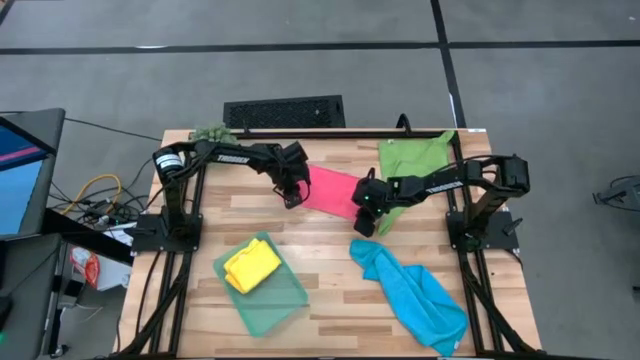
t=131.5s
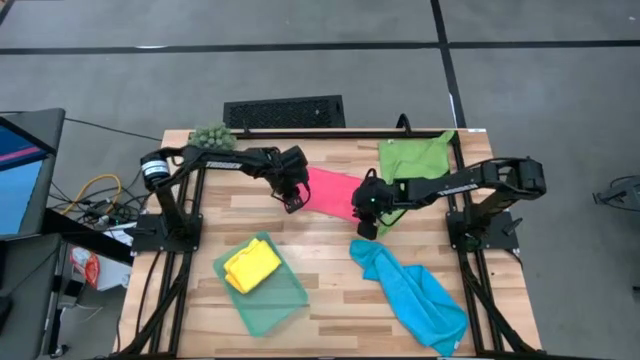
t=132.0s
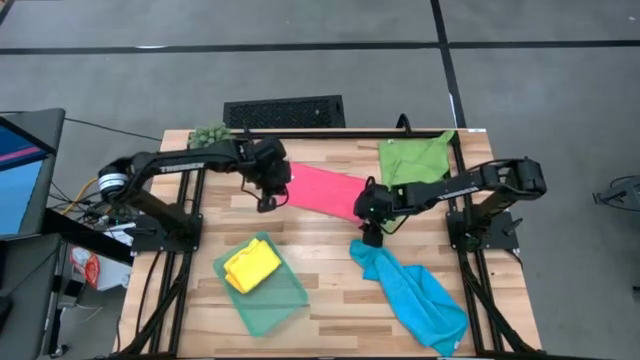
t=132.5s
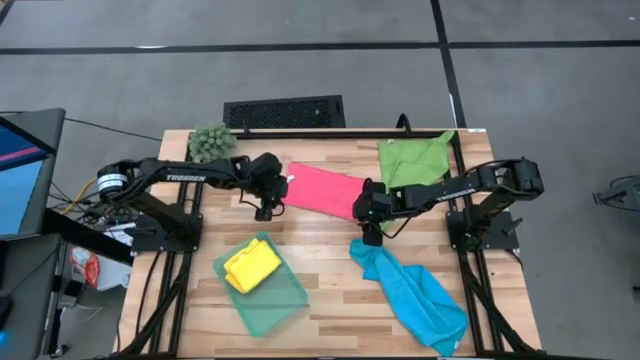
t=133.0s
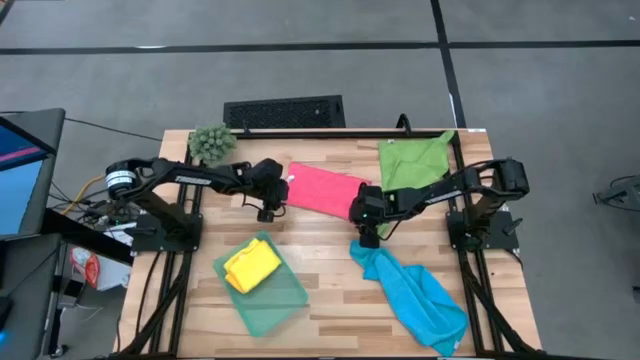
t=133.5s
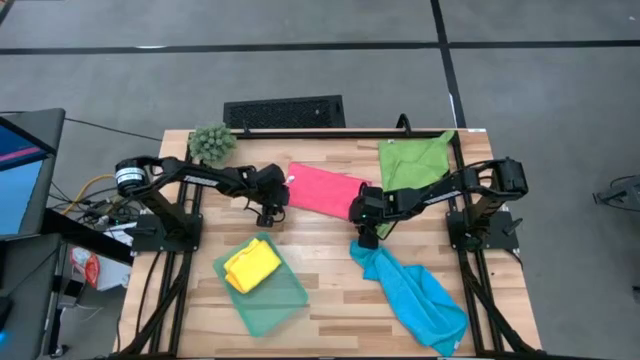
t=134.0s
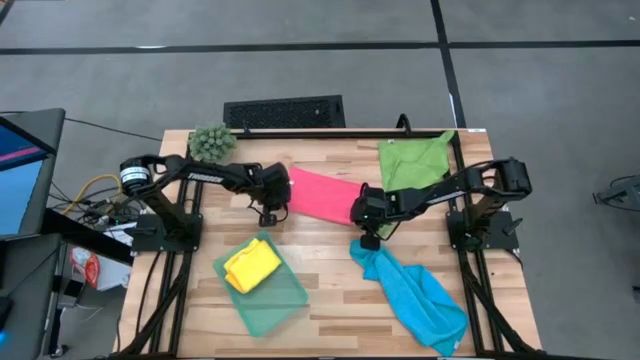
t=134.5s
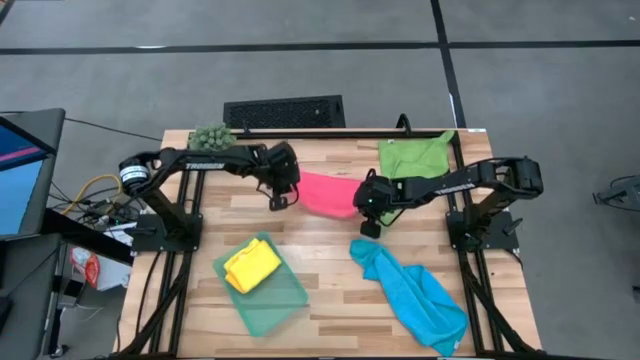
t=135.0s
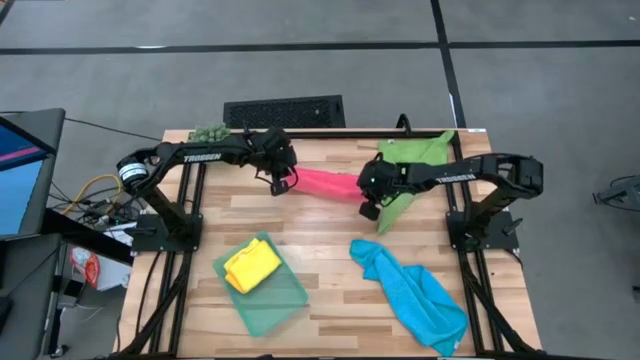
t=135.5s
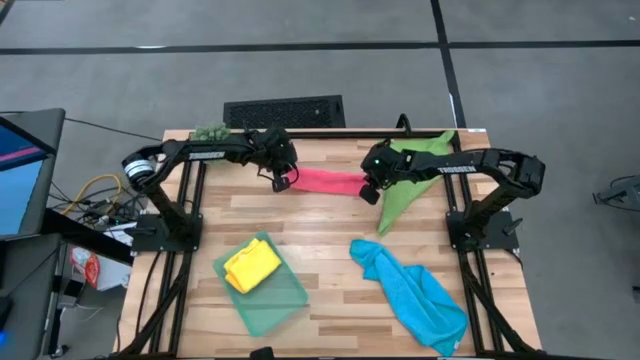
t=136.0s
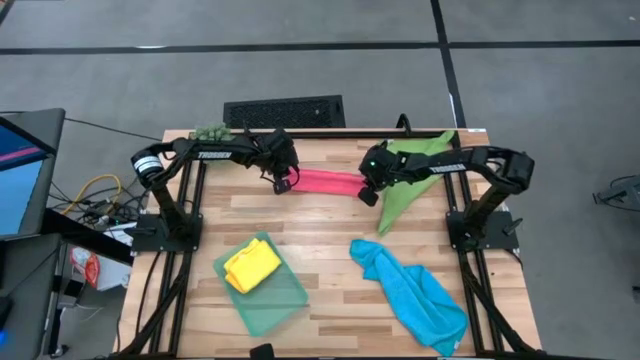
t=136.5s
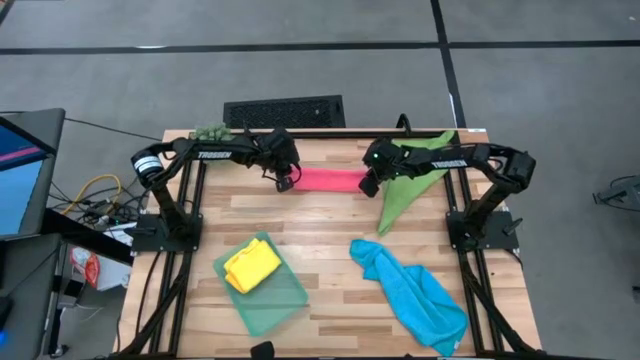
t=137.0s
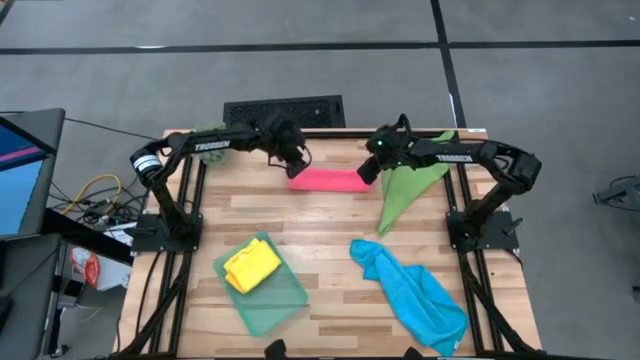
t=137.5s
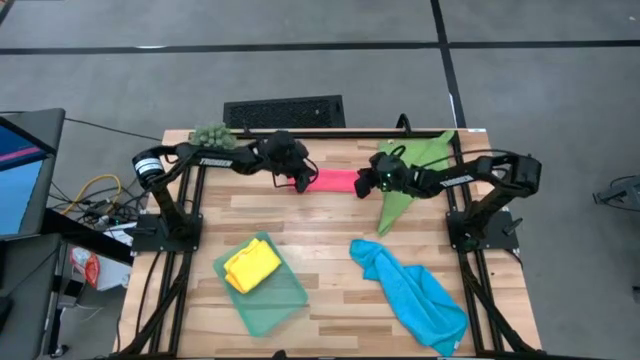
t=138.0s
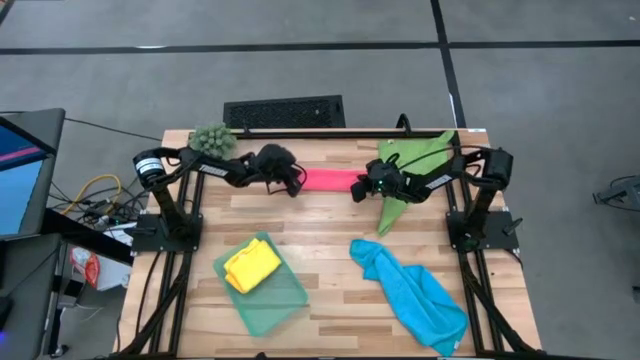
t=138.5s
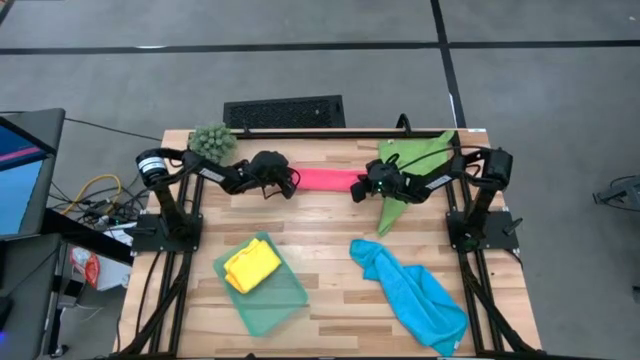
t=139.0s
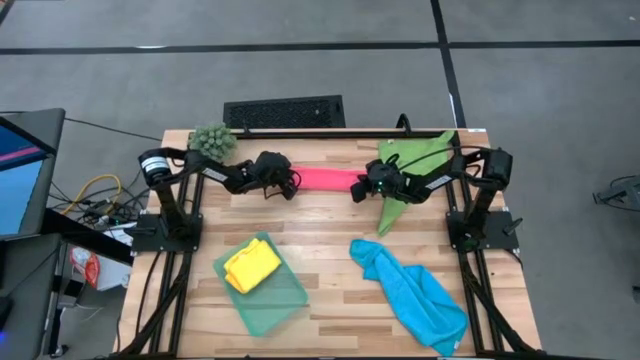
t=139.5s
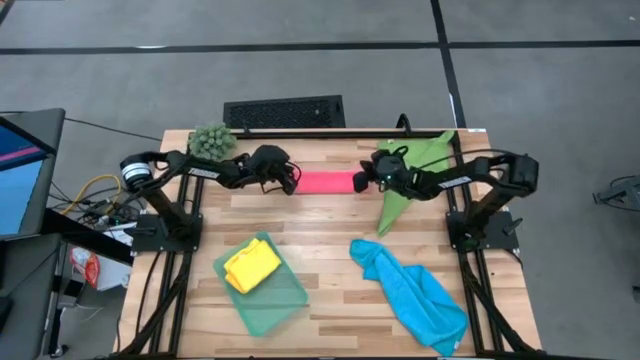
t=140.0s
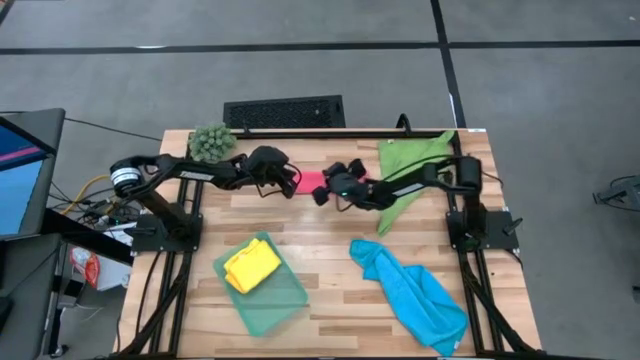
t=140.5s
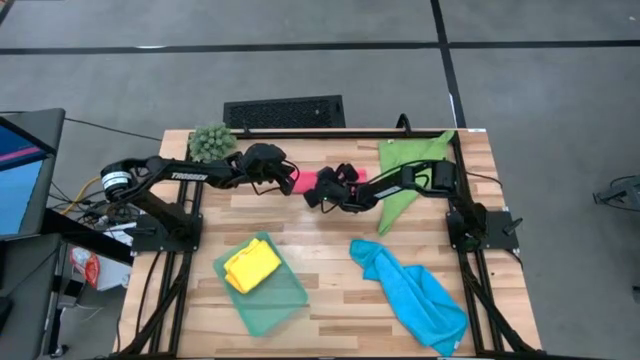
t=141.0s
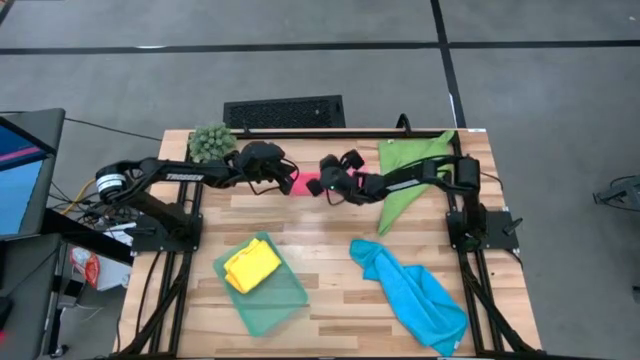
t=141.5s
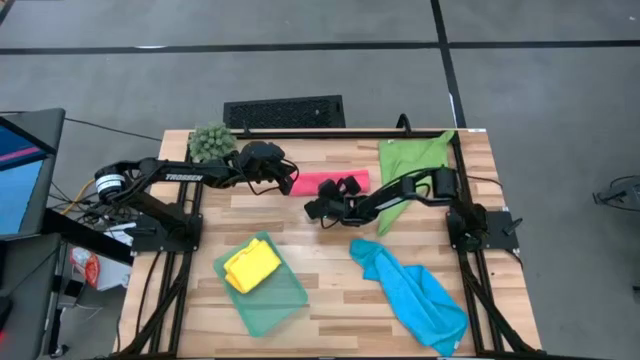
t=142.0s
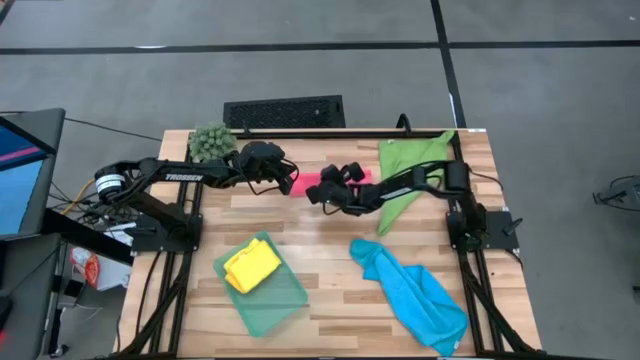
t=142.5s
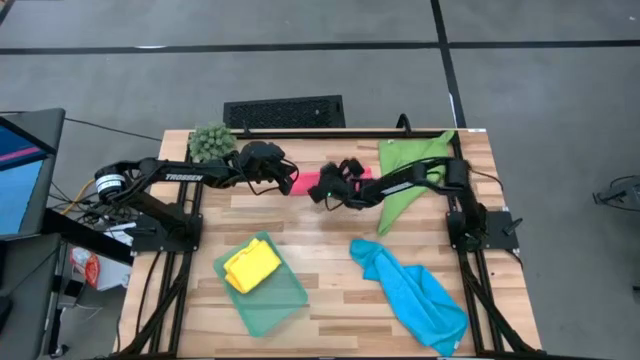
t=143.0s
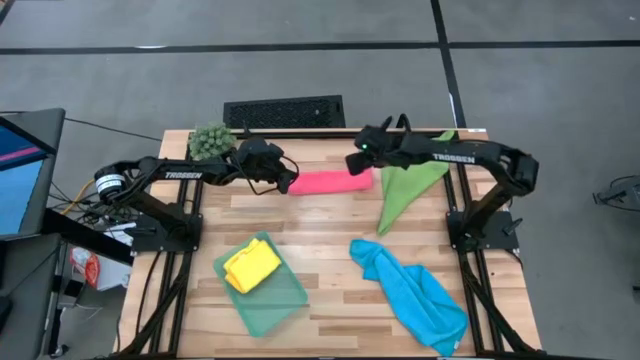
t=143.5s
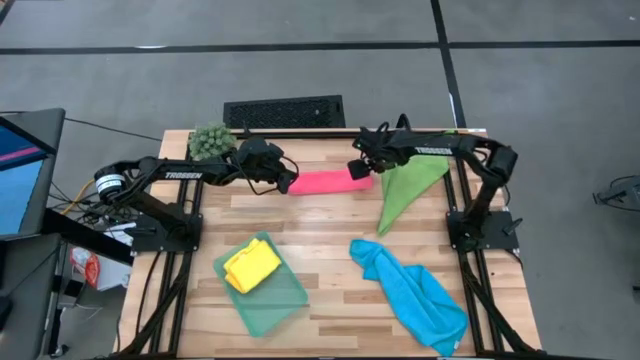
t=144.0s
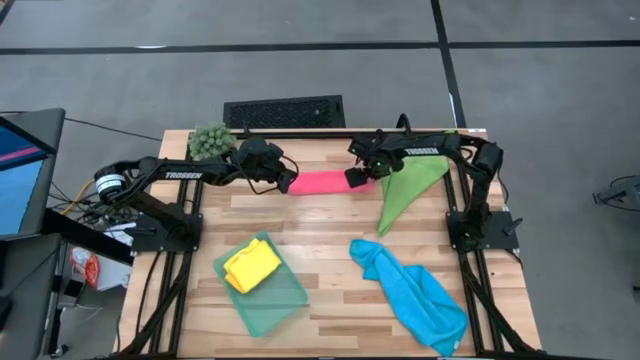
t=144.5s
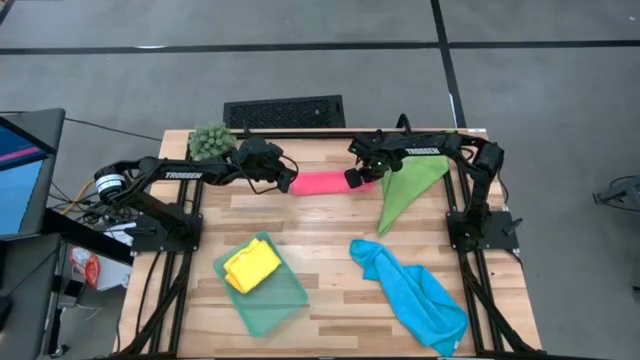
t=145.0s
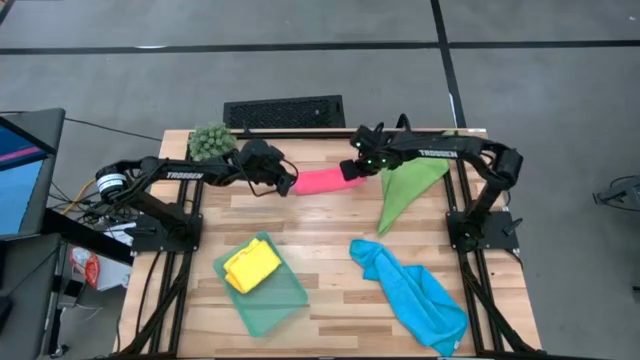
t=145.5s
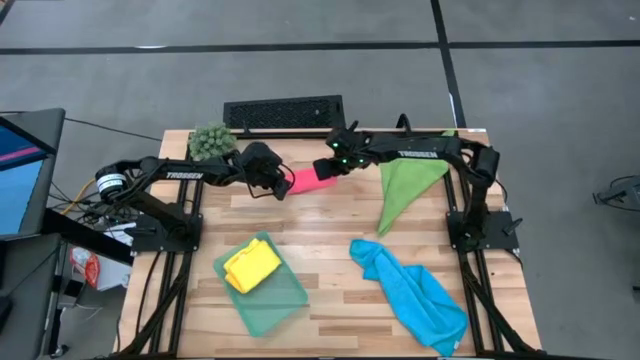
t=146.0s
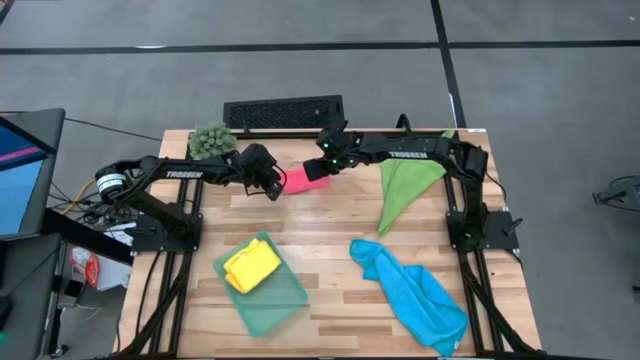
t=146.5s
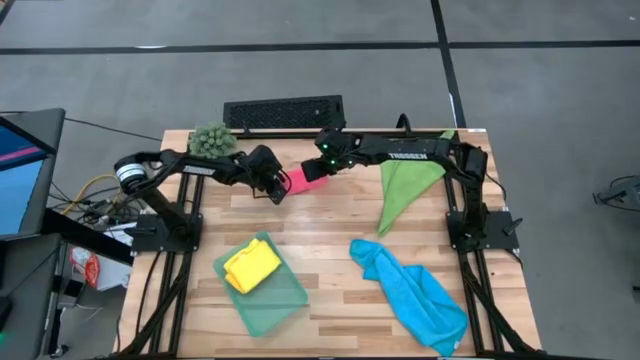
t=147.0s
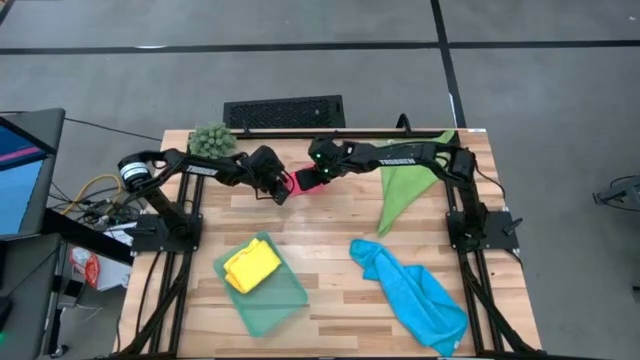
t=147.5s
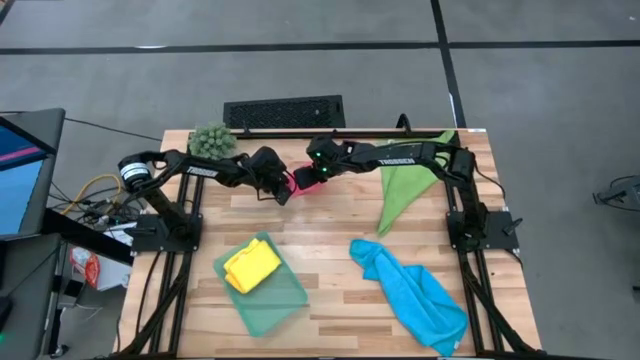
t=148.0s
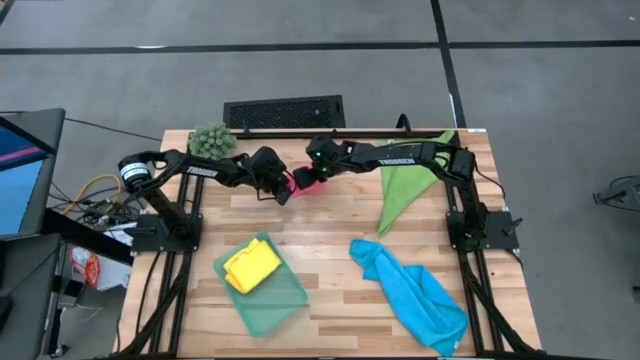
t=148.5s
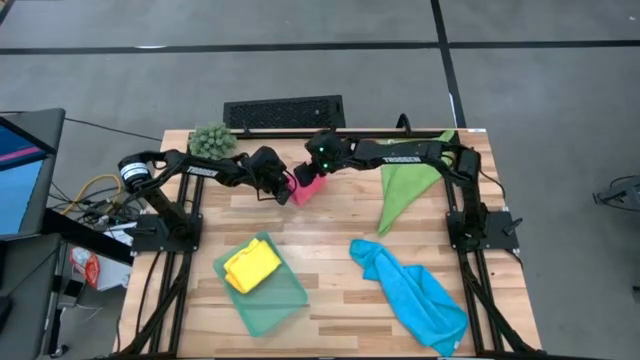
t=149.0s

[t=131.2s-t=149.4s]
Task: Fold microfiber towels
Fold the pink towel
